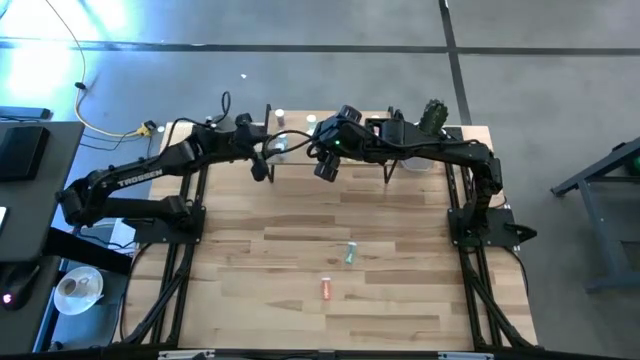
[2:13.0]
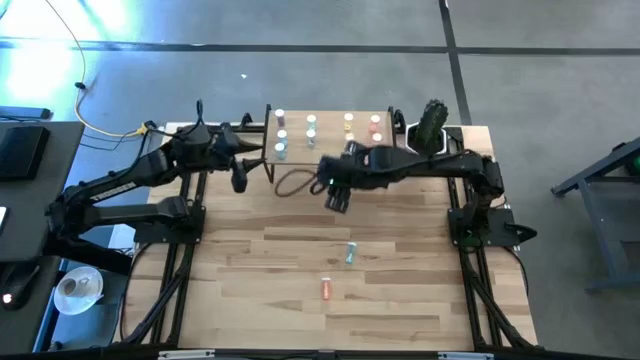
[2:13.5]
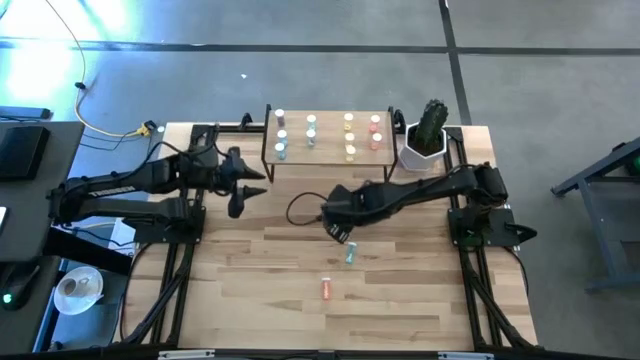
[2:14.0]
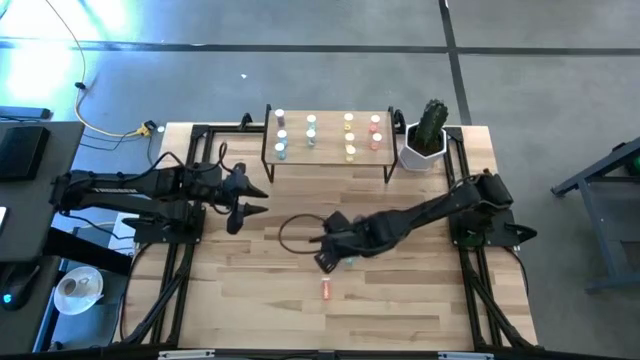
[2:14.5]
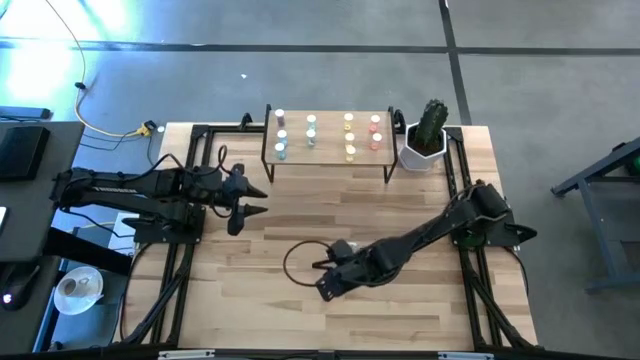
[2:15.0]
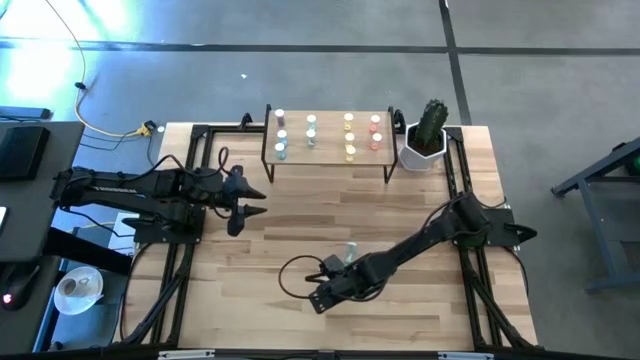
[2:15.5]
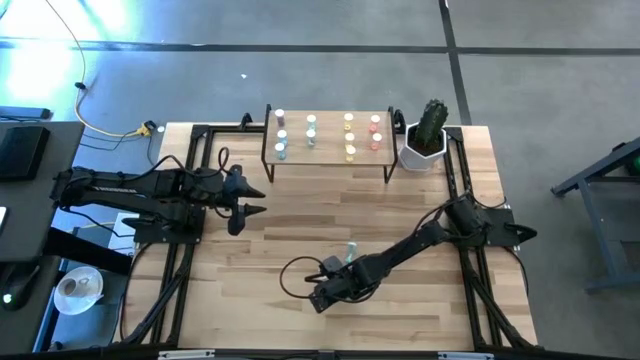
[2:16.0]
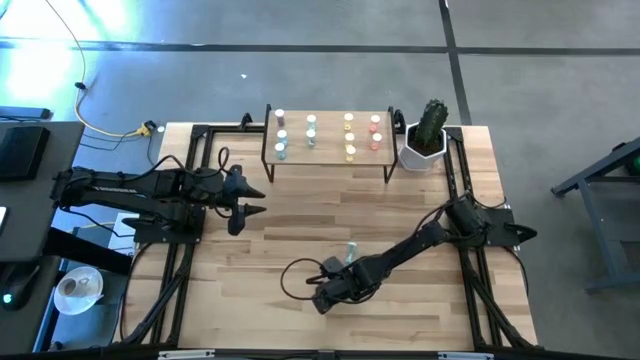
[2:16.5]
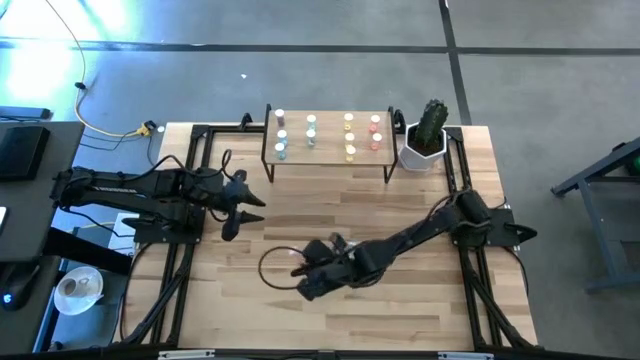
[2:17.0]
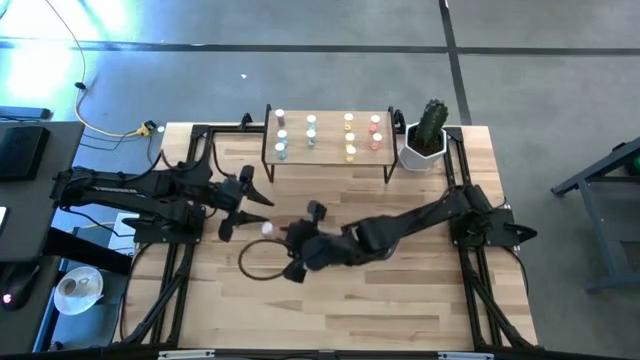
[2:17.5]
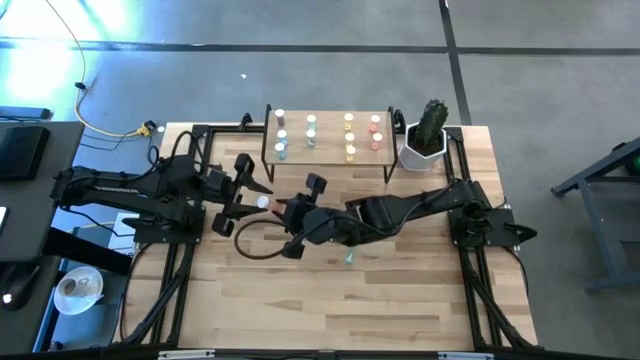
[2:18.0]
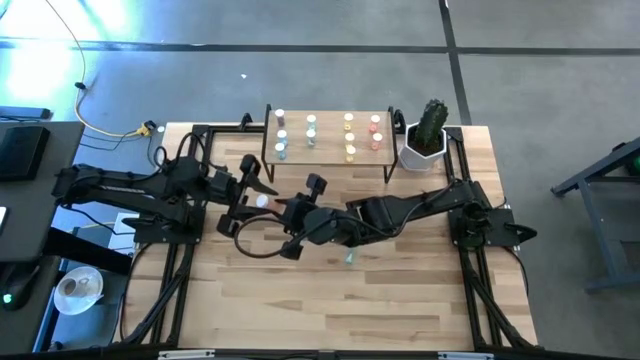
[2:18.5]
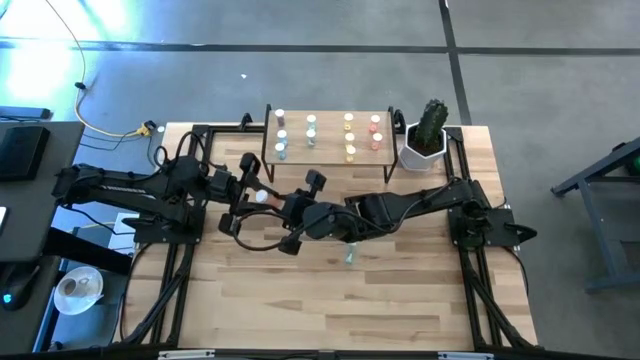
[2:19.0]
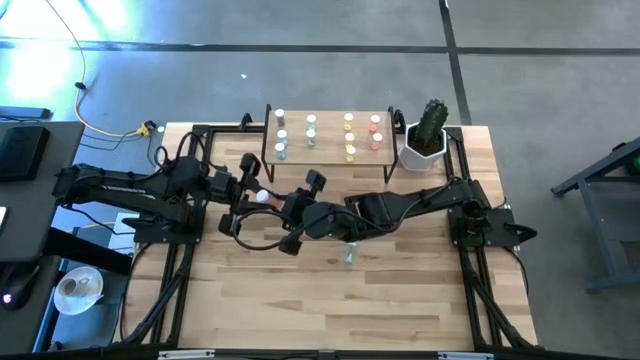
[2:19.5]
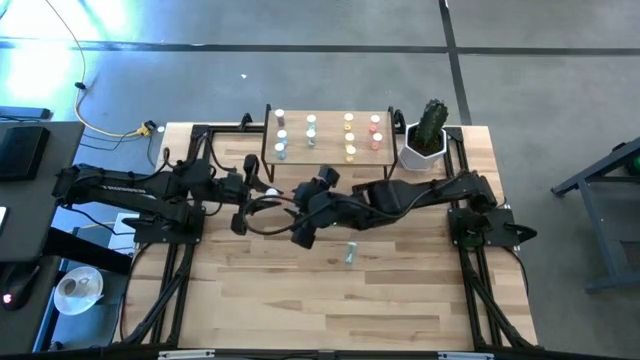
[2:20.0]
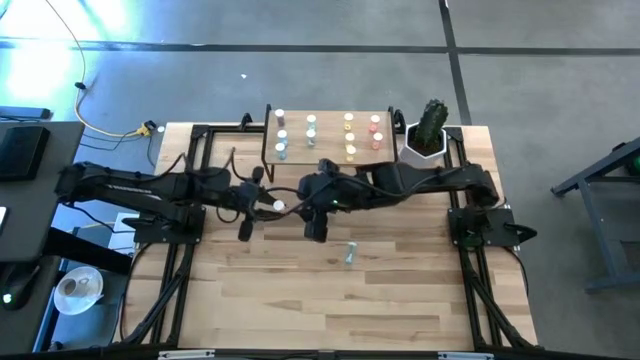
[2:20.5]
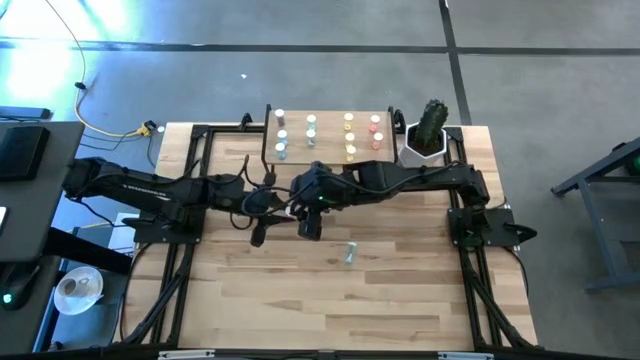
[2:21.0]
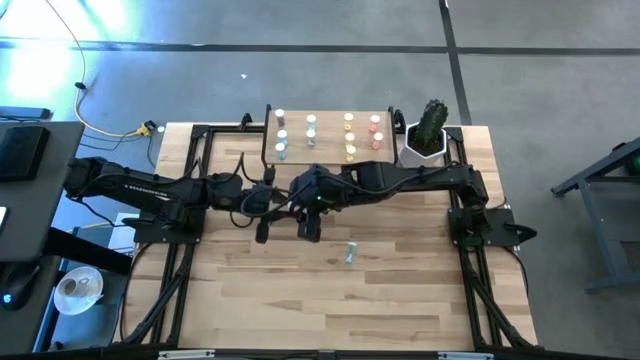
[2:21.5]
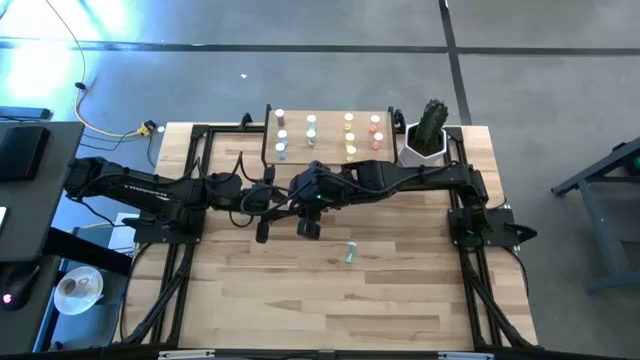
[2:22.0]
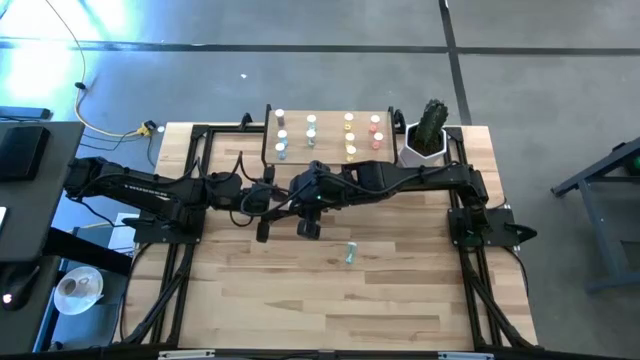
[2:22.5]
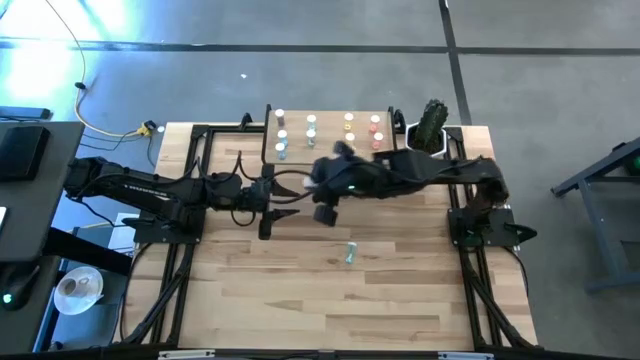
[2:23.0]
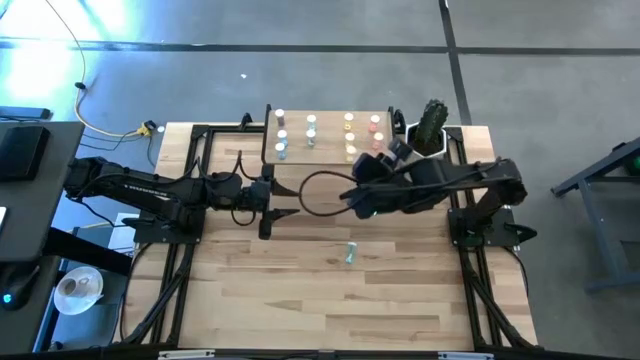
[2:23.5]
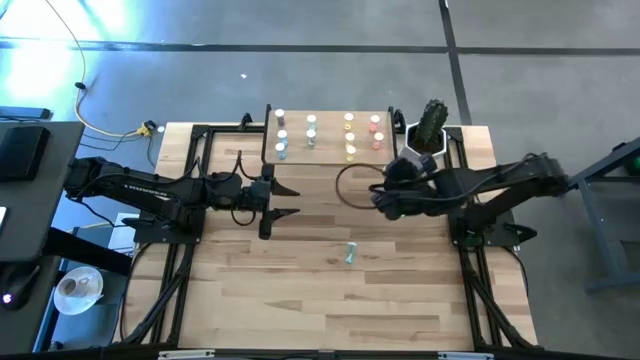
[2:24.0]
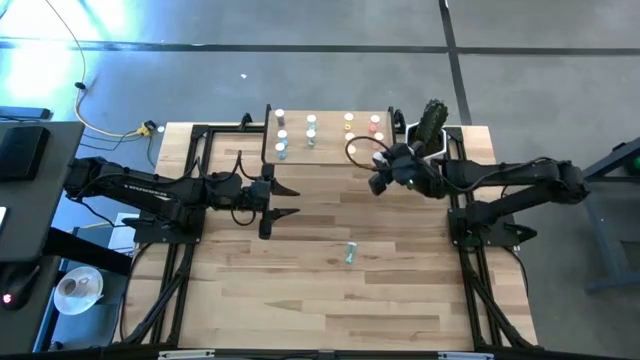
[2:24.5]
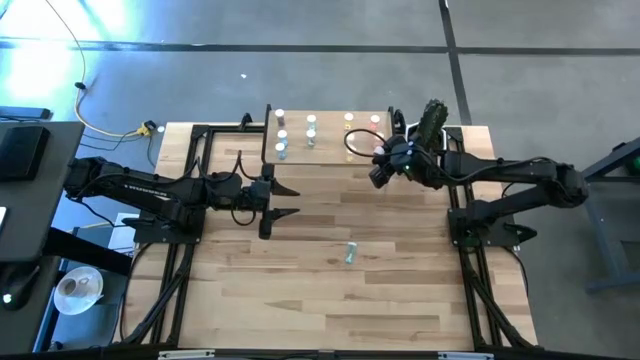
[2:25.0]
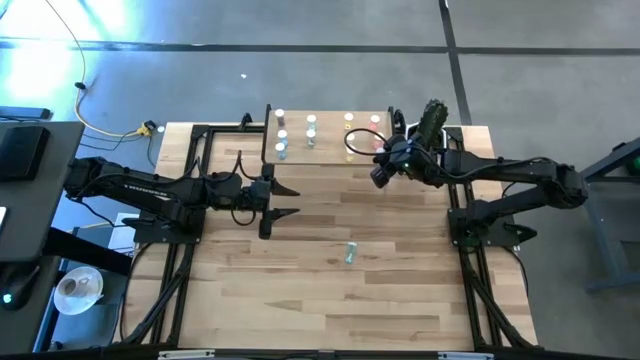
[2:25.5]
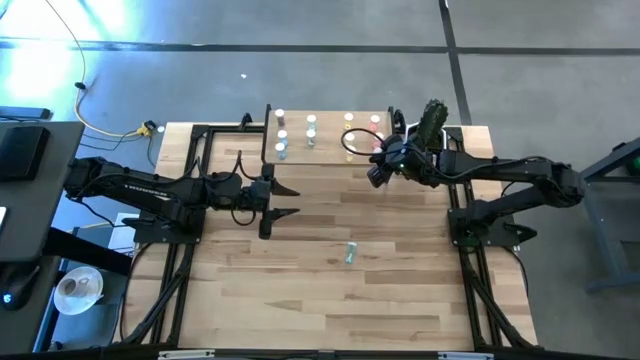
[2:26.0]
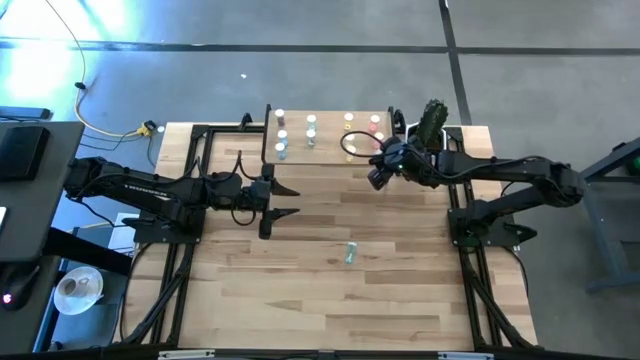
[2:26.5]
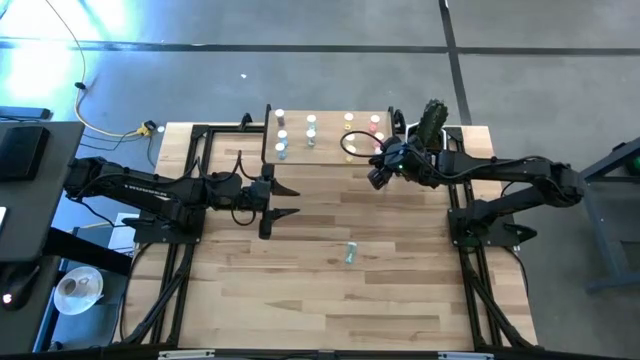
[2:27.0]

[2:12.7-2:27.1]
Task: Pick and place medicine bottles onto shelf by color
Put the pink pill bottle on the shelf aligned with the other pink pill bottles

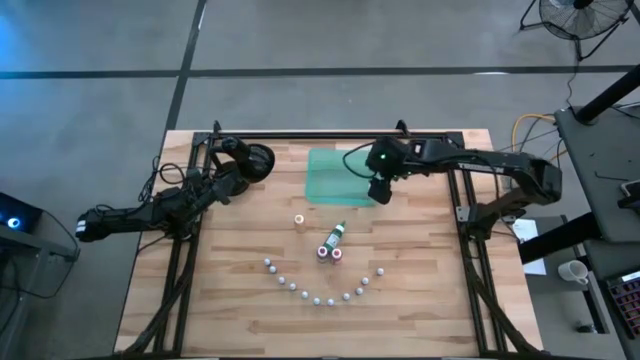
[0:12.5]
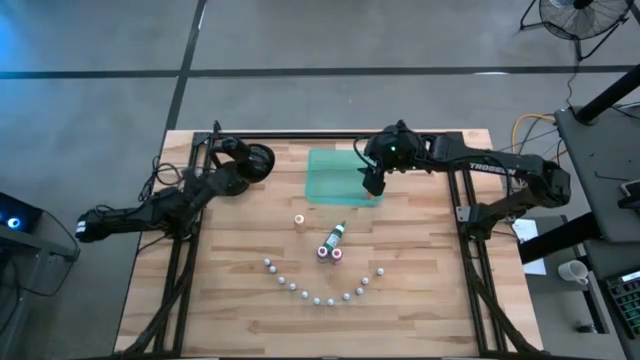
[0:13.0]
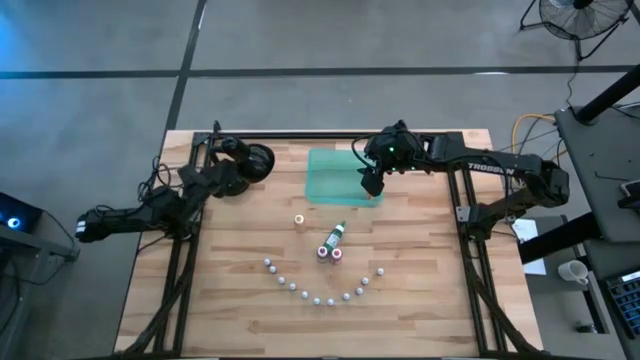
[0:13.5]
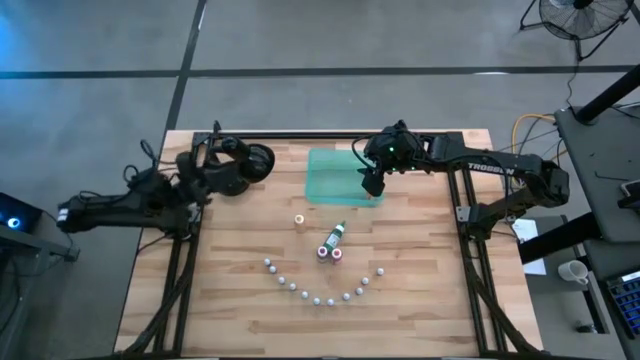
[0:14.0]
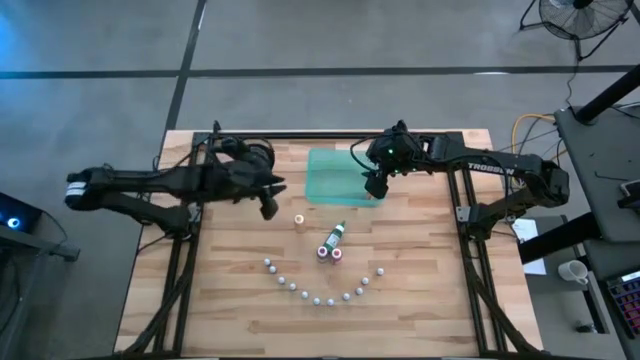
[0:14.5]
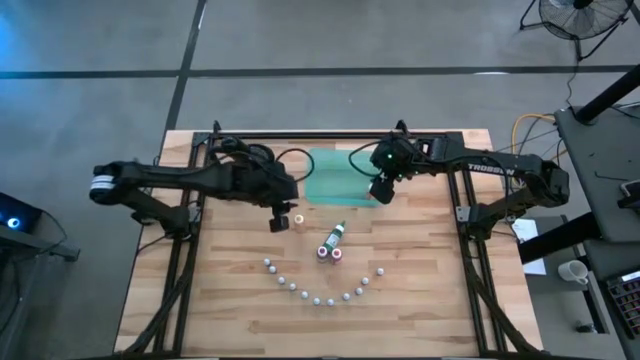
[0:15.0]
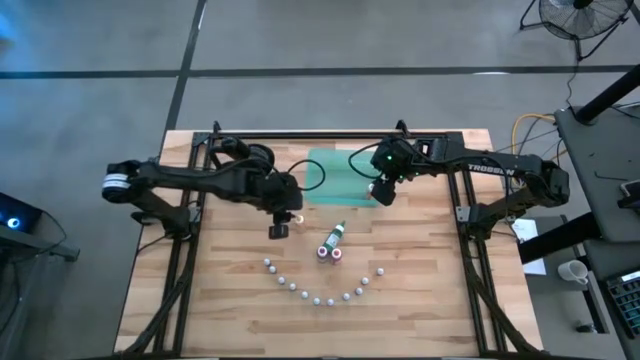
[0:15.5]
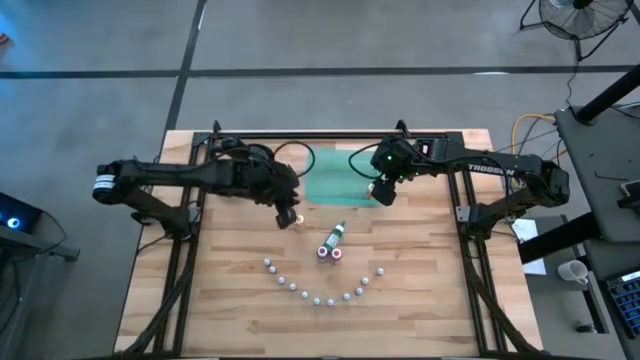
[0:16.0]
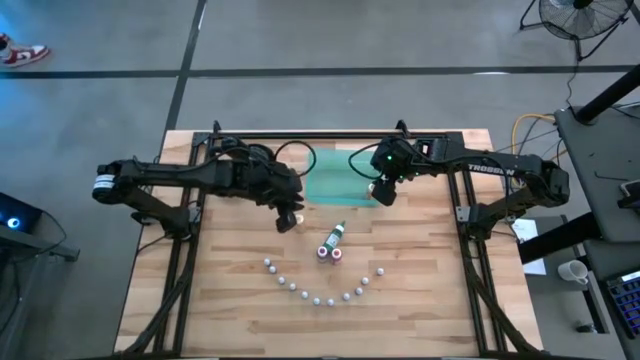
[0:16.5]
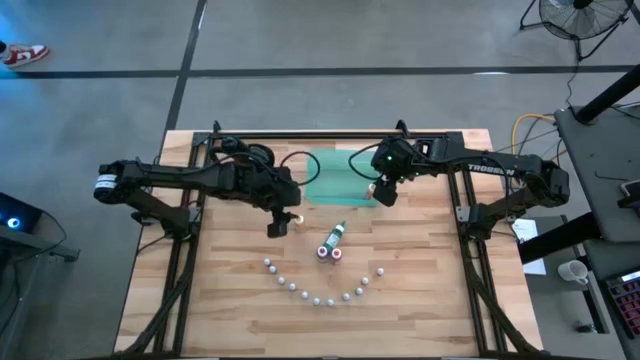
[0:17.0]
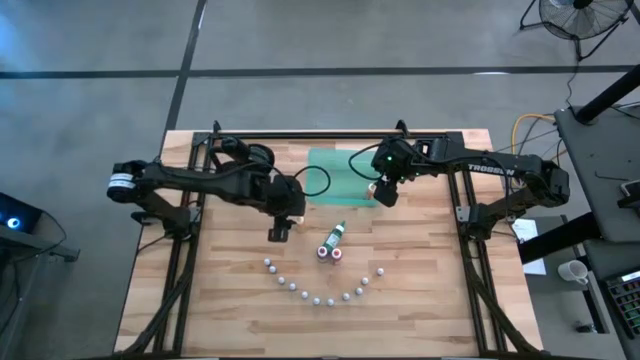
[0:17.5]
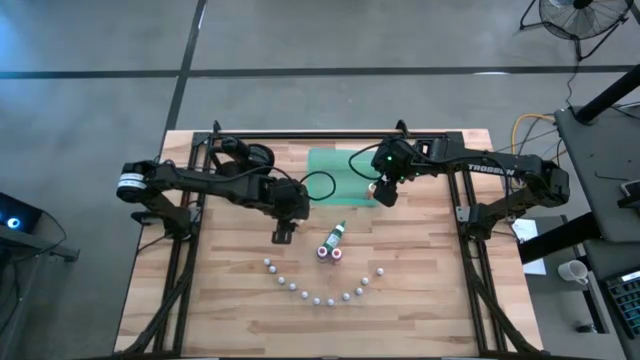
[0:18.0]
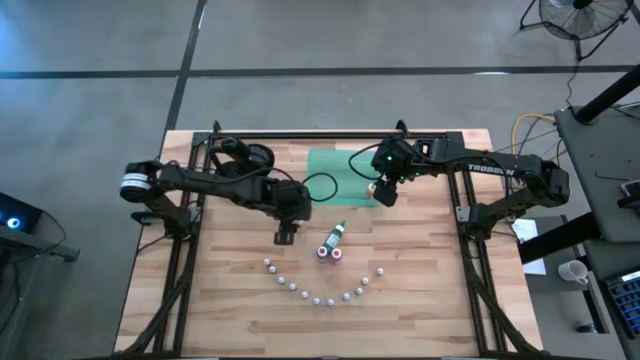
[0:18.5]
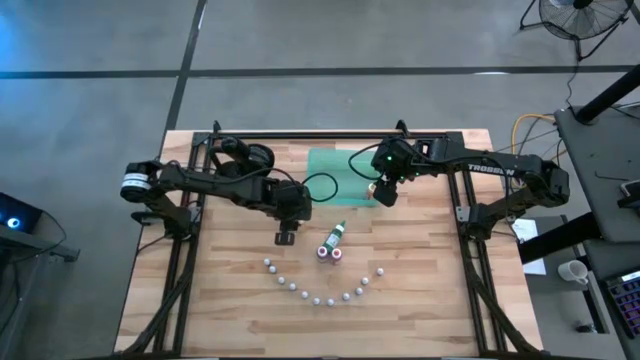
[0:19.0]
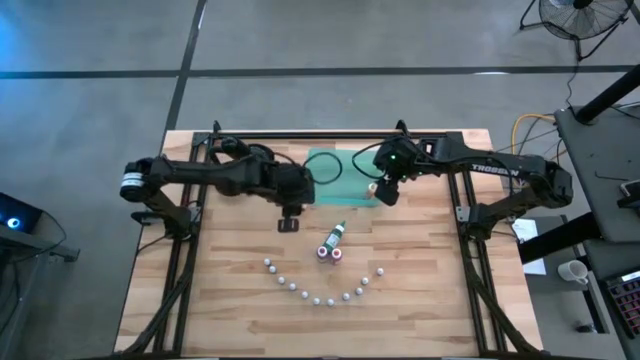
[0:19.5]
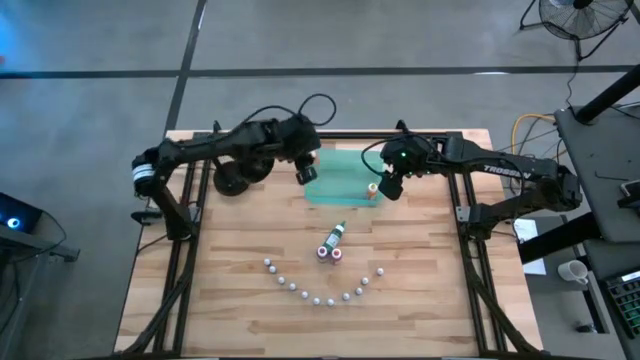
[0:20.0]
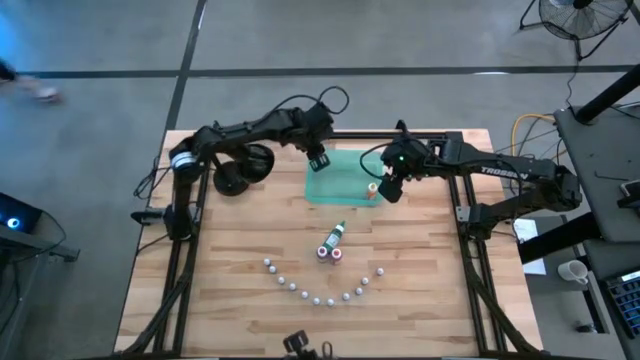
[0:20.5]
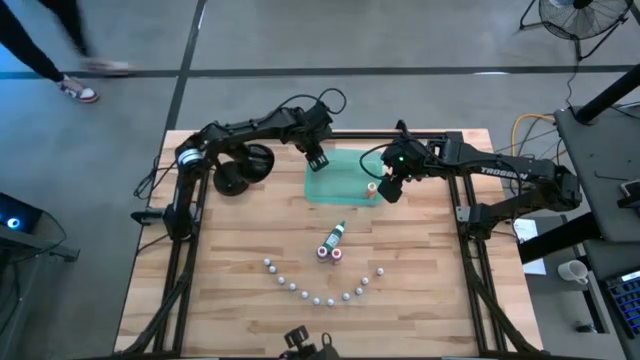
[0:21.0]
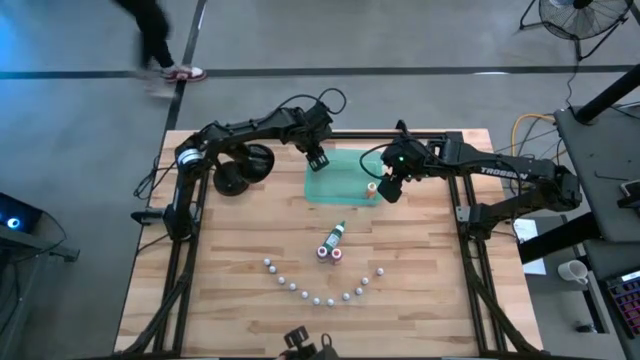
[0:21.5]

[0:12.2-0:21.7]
Task: Pick & Place food coloring
Put the large yellow food coloring bottle into the green bin
